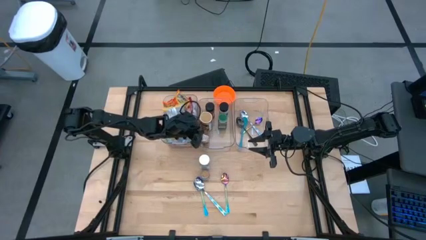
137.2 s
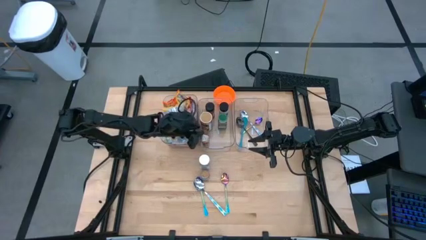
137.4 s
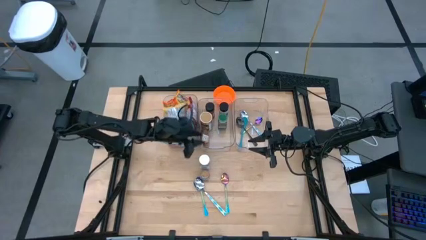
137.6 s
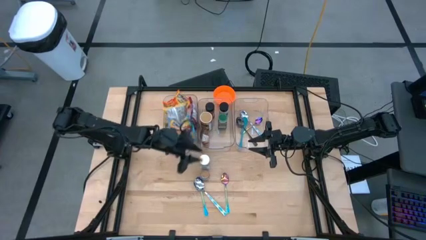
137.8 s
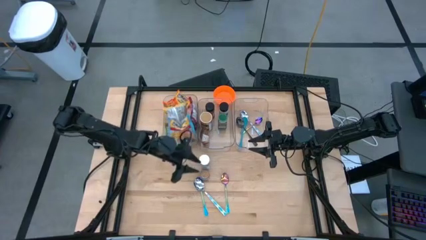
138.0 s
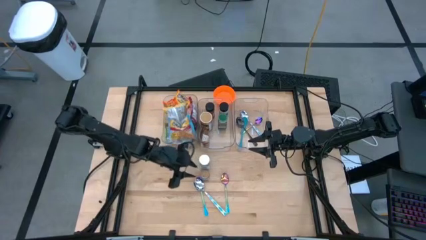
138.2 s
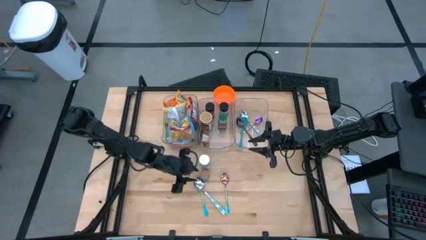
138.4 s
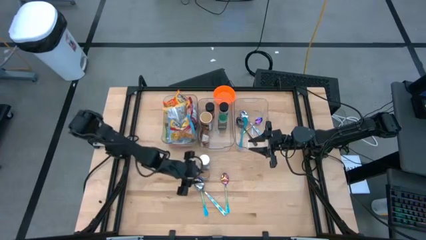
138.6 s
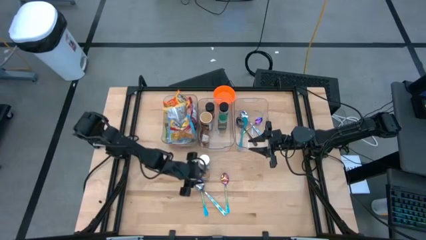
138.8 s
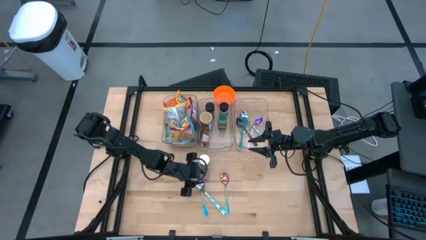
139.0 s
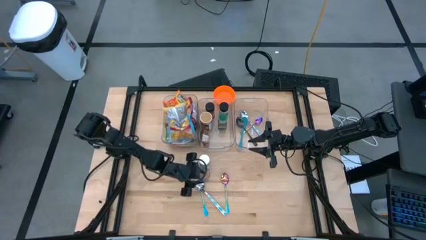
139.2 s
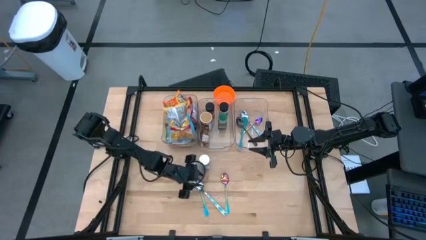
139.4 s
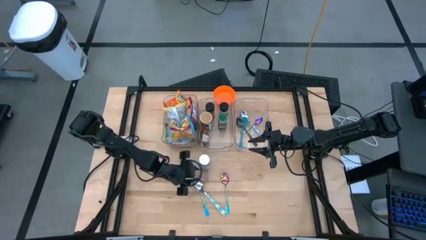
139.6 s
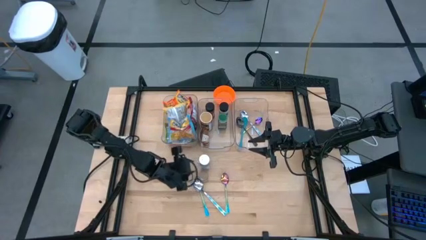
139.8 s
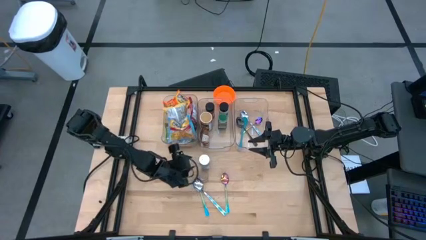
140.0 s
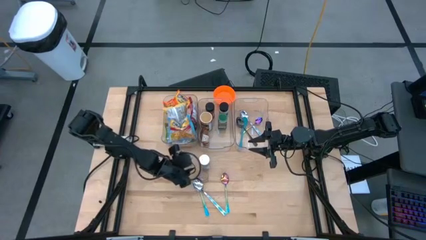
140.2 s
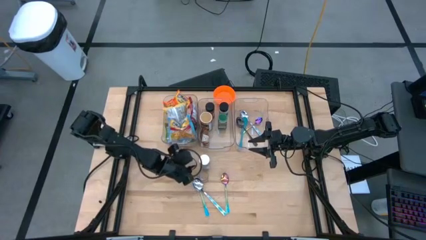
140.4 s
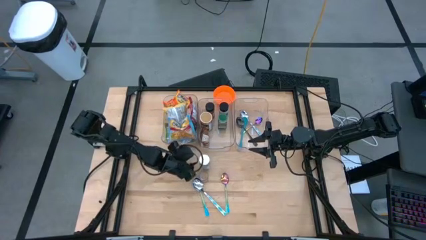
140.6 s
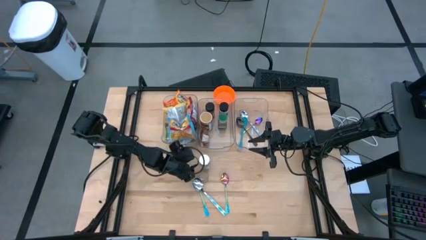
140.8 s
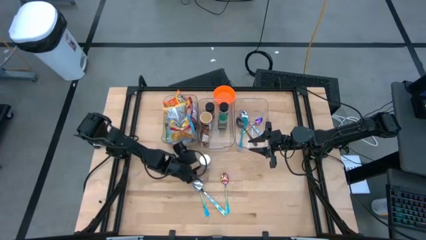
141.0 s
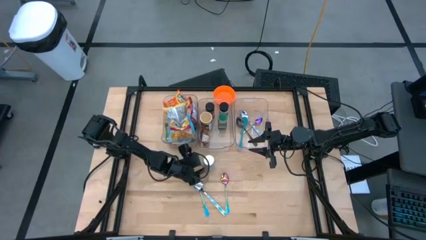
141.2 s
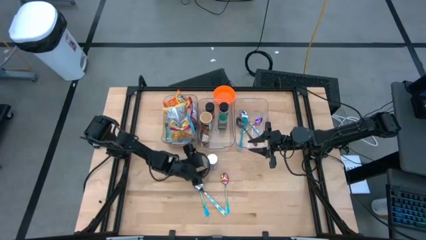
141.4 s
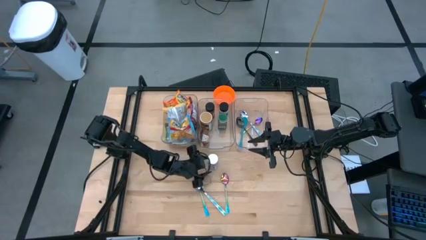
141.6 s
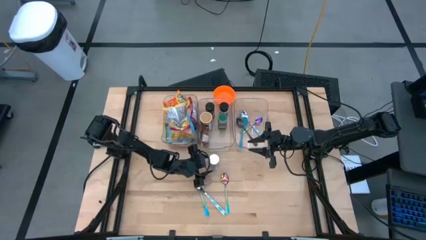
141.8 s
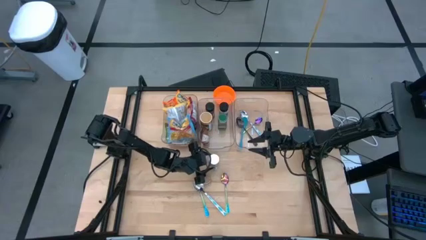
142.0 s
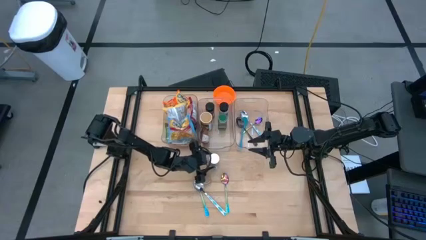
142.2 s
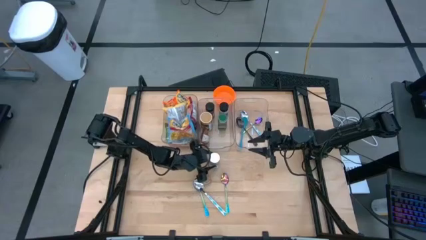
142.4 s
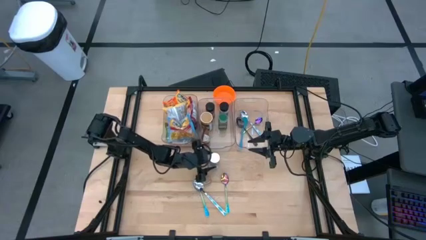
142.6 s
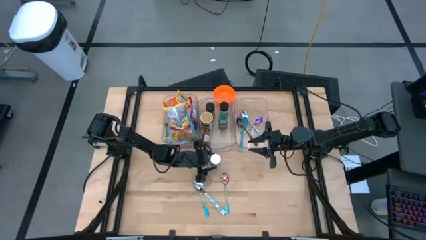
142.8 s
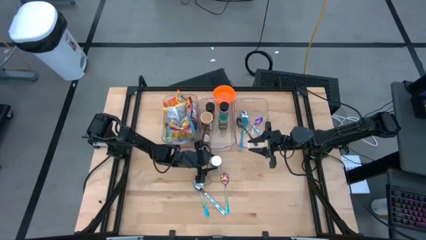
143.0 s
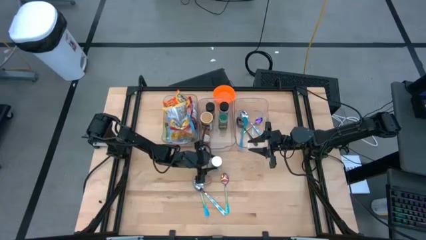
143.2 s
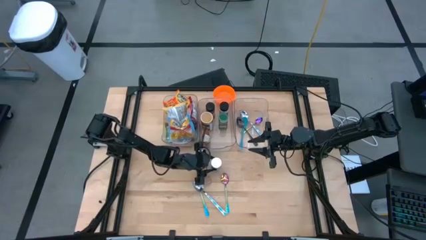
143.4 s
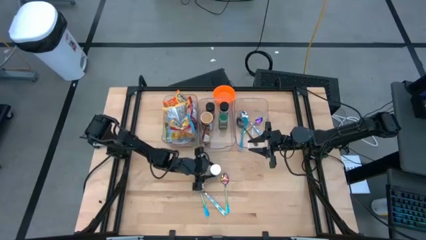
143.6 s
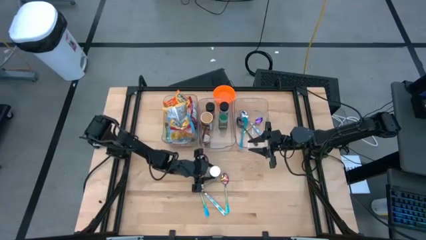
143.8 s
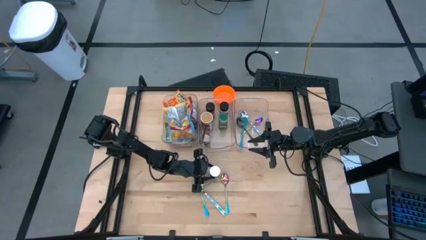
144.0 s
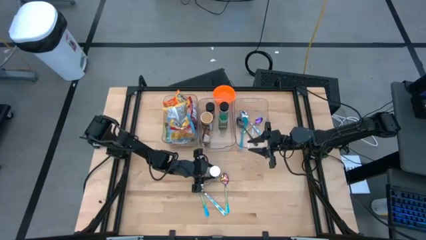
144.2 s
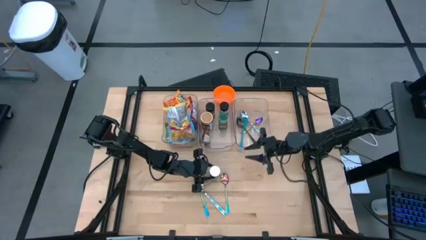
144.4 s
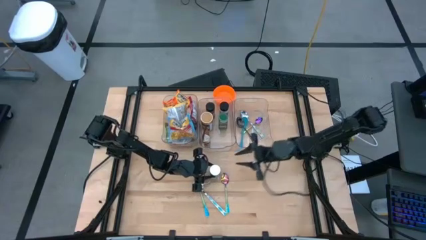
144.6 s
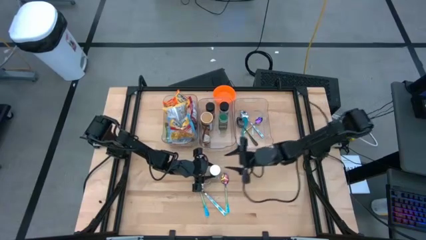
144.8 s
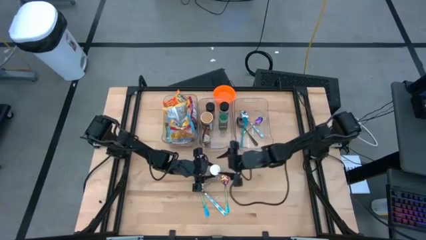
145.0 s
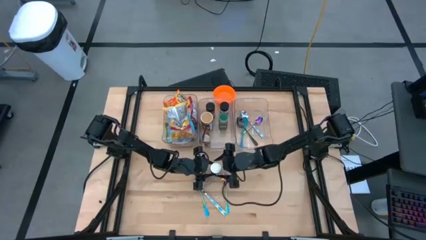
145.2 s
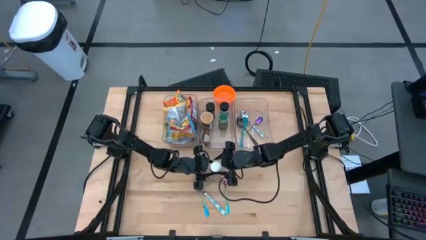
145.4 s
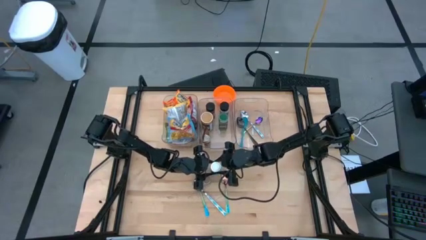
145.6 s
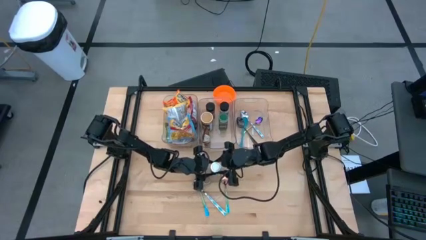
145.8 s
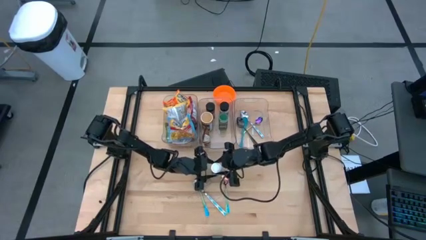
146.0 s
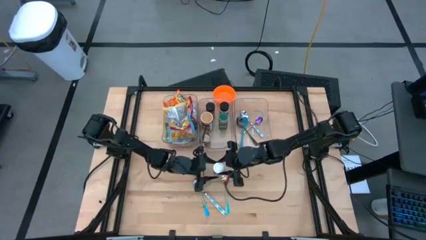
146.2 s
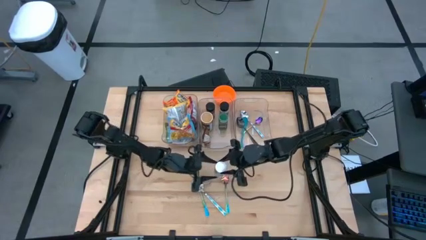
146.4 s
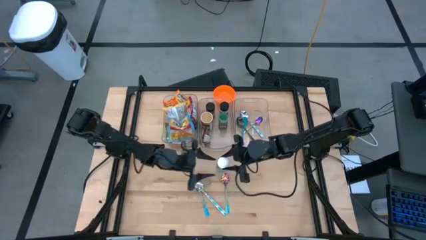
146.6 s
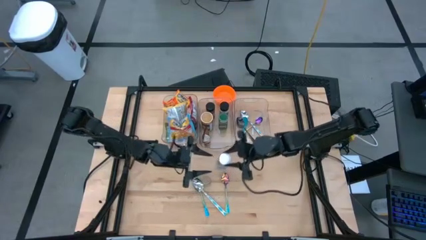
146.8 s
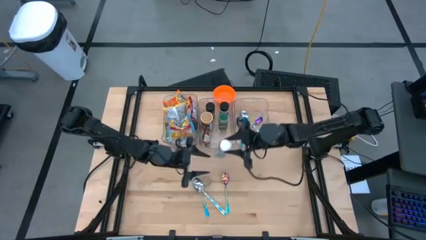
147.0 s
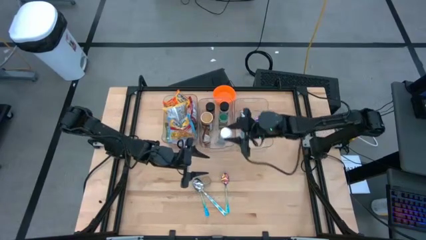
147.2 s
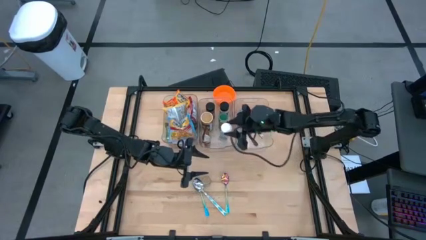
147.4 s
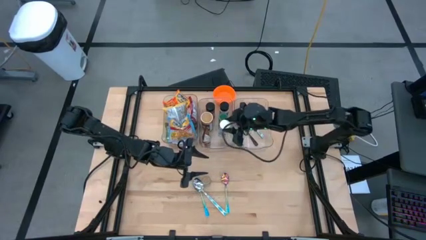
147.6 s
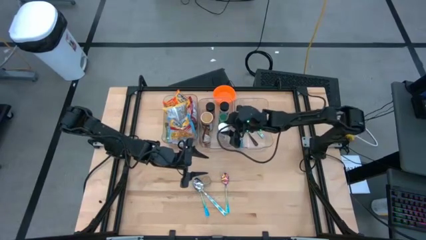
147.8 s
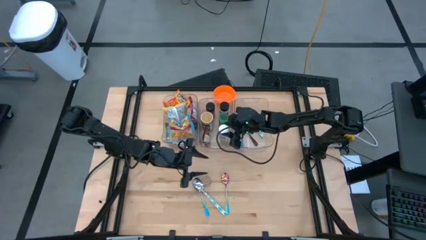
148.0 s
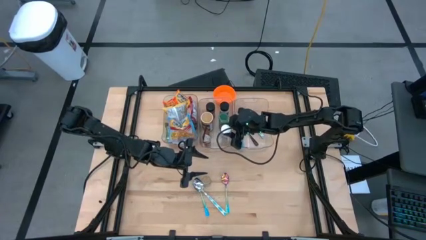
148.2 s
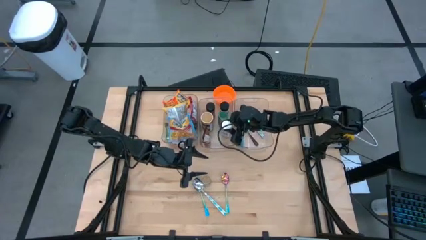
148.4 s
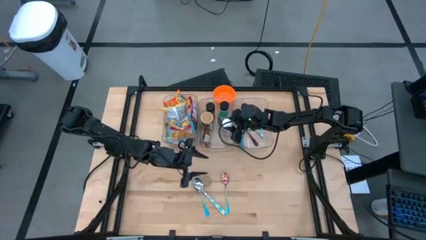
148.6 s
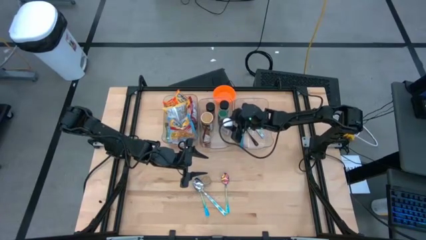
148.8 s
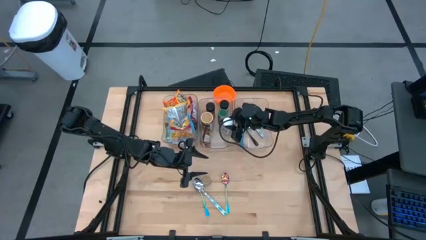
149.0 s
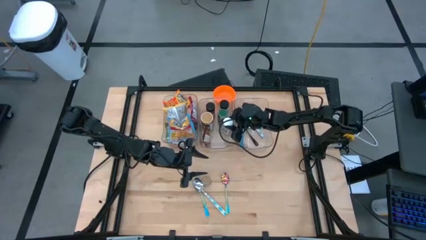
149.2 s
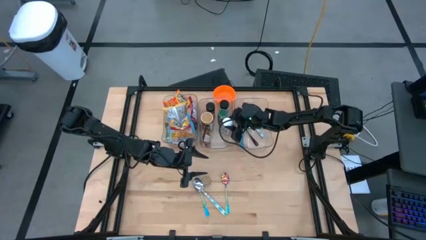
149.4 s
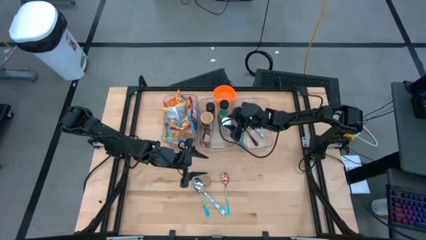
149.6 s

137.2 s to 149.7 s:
Task: Pick & Place Food Item
Put the white seasoning bottle into the middle transparent bin

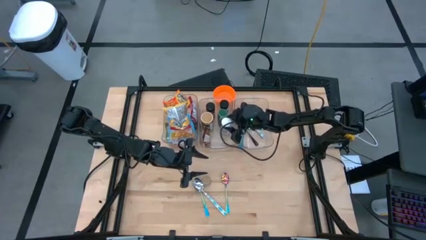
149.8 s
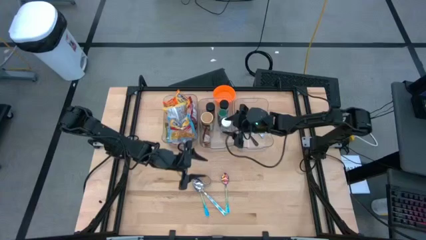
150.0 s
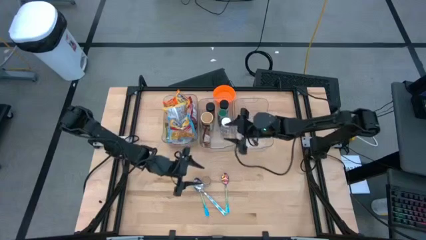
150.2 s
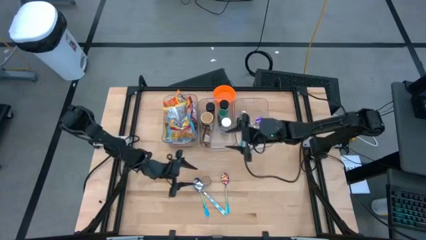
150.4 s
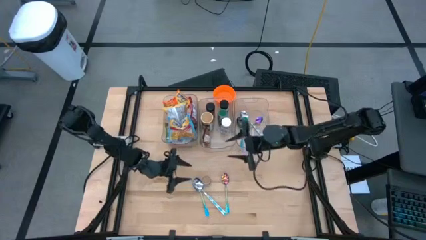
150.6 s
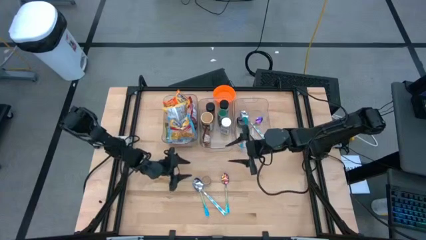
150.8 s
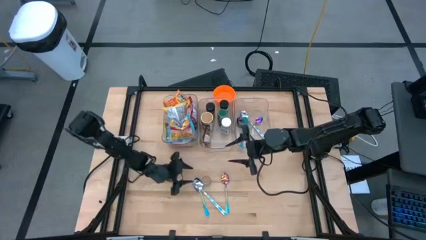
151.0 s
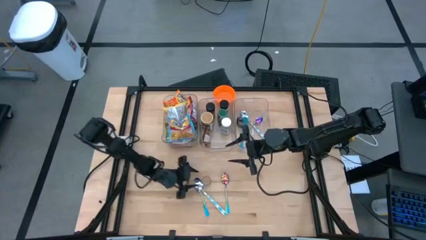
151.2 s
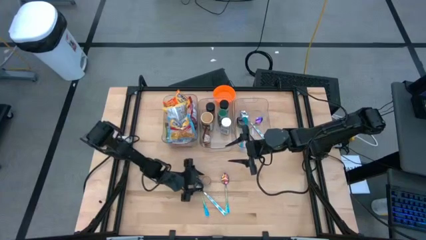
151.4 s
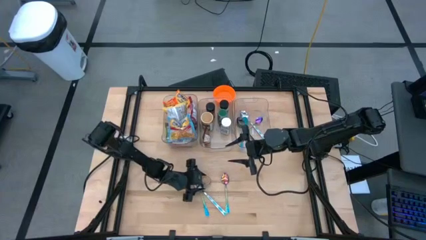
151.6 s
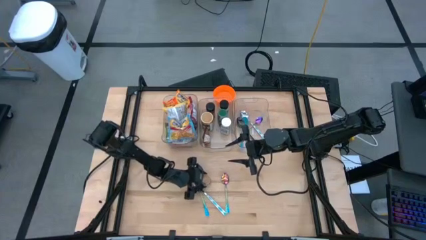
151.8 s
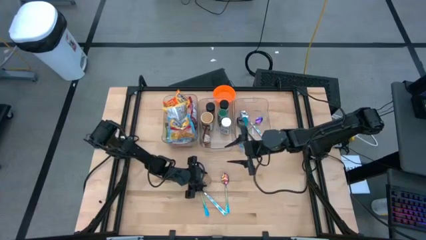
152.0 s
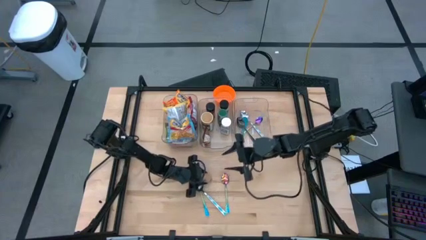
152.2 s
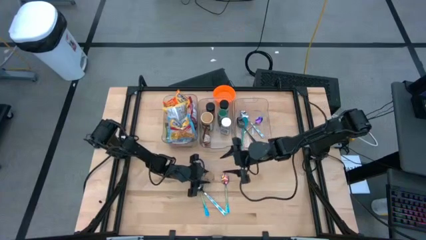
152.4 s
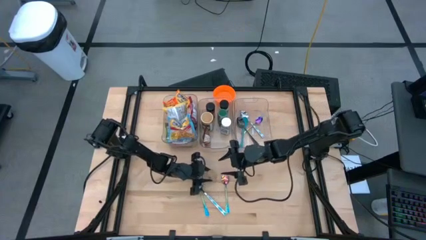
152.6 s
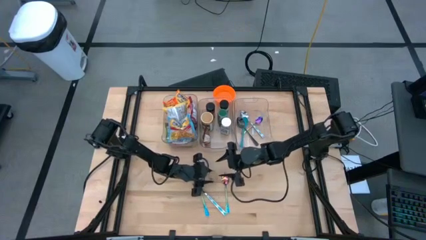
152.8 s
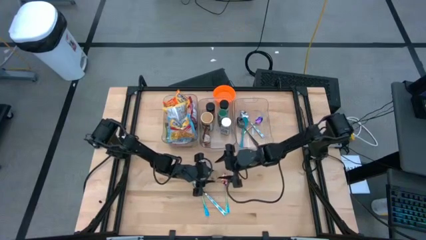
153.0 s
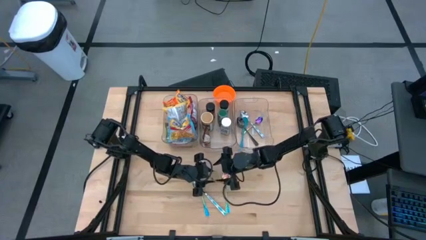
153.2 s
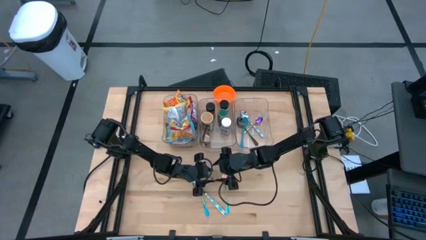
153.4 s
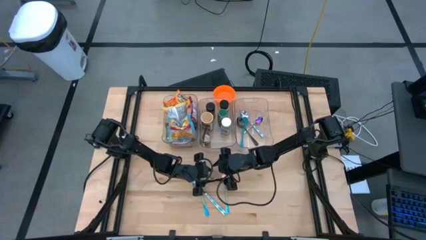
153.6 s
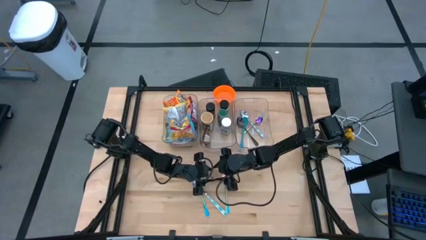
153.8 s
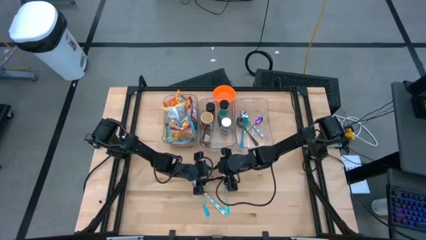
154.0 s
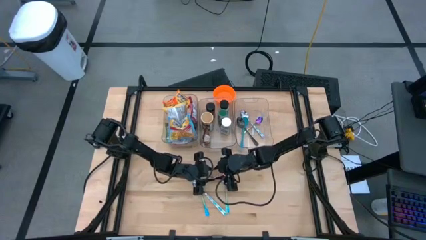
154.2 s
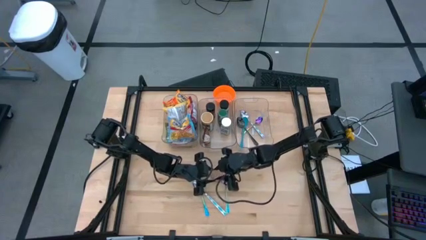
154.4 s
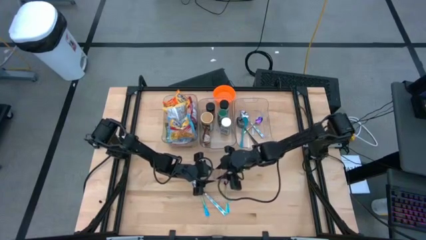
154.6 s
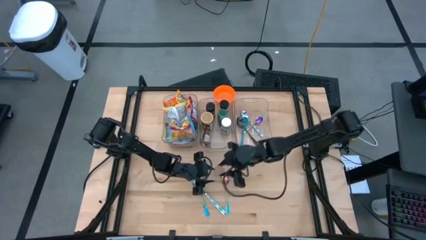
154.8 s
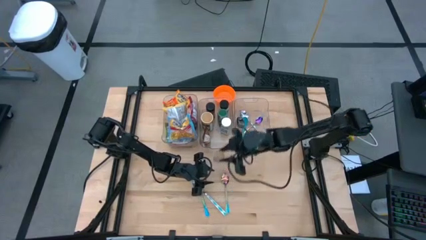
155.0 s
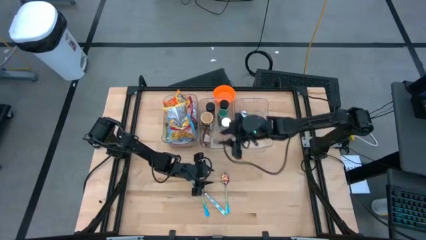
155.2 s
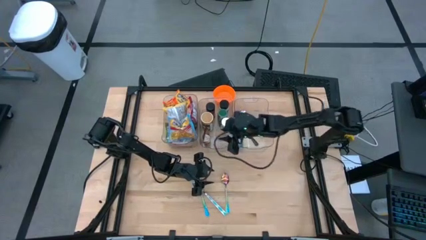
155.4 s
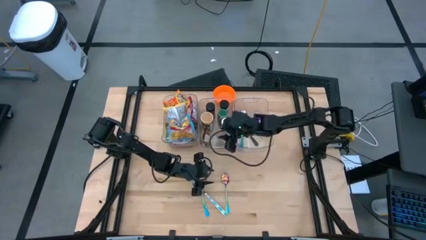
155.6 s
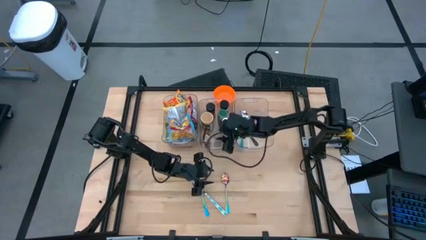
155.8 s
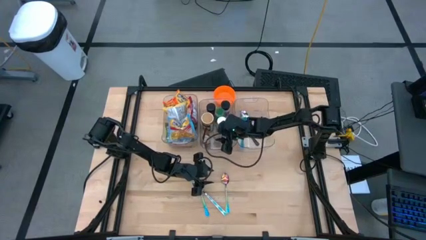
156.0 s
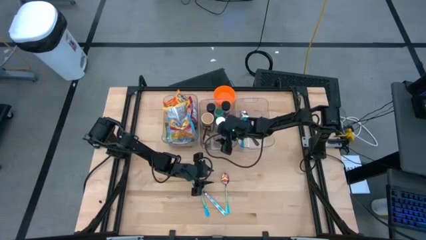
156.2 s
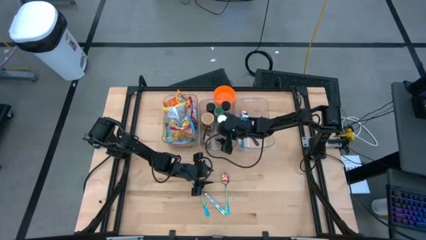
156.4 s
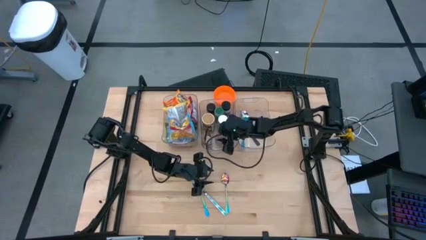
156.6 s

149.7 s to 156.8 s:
Put the brown seasoning bottle into the middle transparent bin
